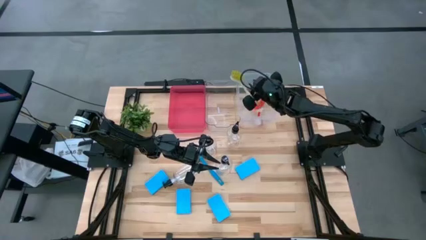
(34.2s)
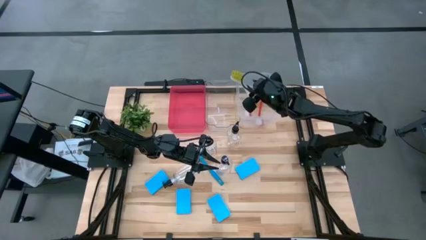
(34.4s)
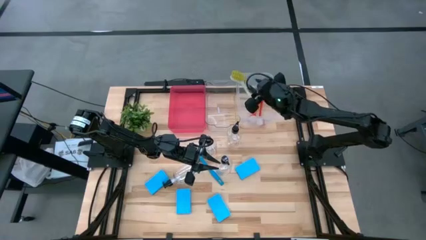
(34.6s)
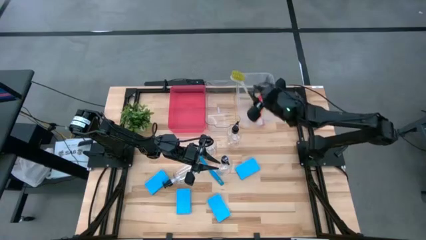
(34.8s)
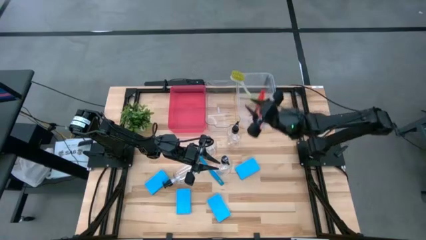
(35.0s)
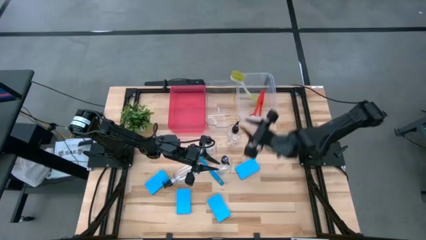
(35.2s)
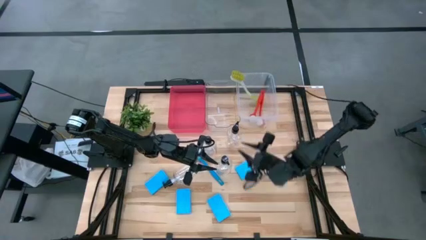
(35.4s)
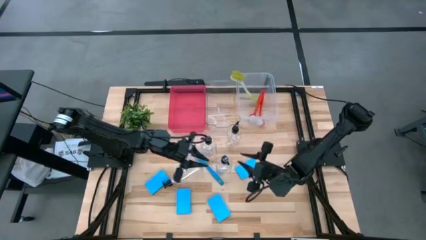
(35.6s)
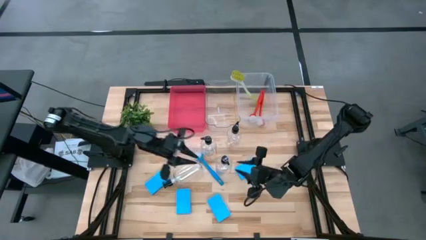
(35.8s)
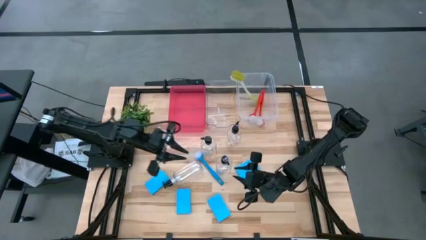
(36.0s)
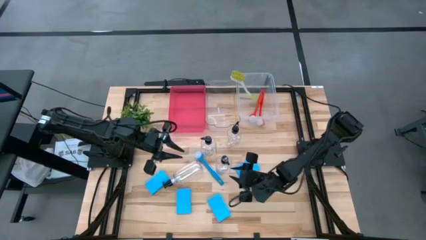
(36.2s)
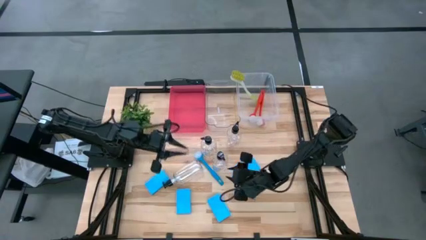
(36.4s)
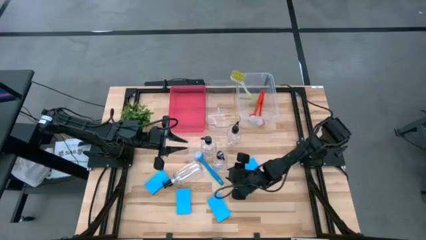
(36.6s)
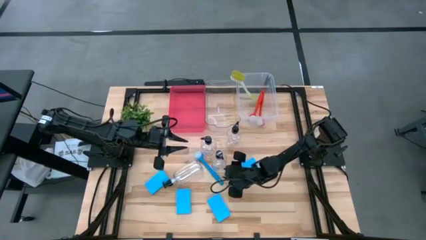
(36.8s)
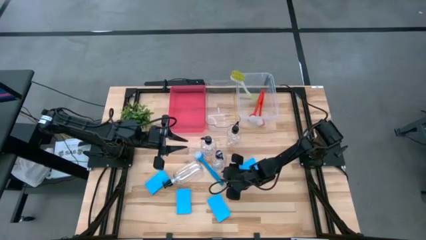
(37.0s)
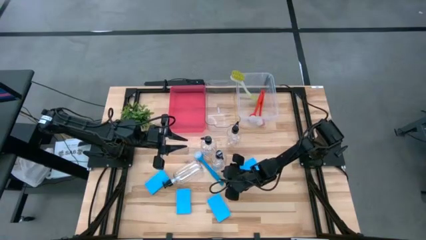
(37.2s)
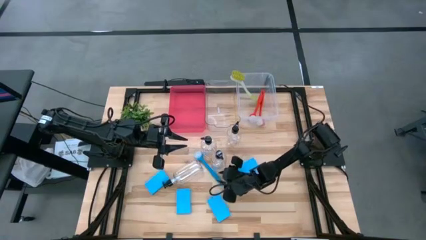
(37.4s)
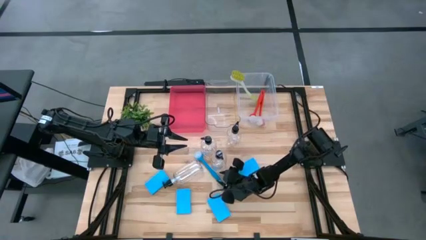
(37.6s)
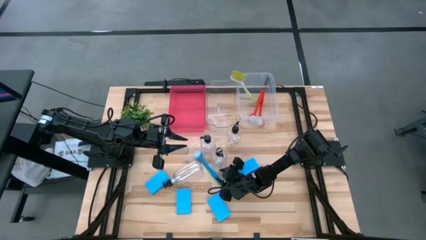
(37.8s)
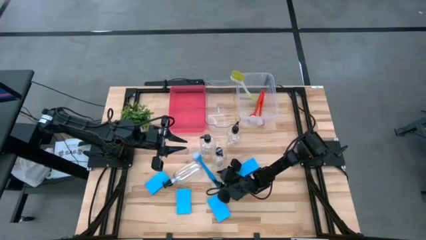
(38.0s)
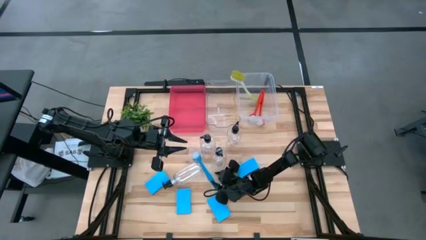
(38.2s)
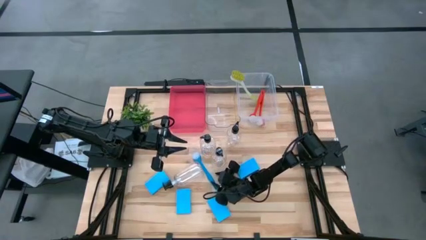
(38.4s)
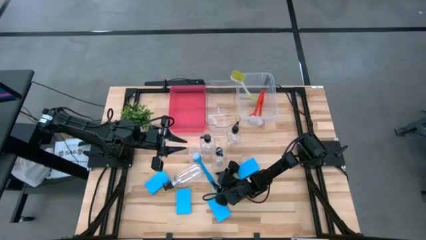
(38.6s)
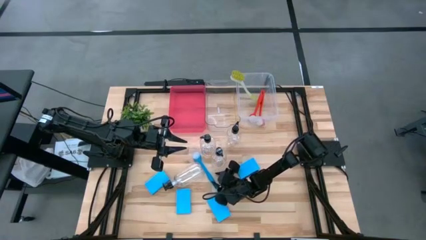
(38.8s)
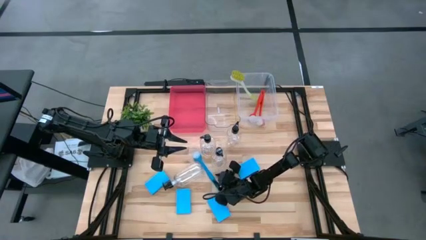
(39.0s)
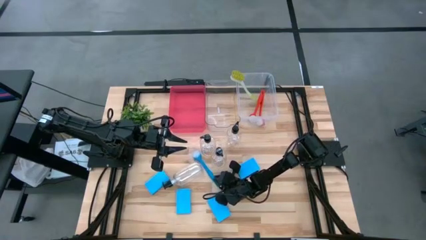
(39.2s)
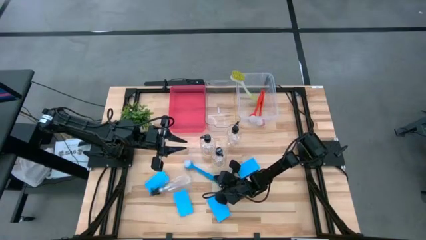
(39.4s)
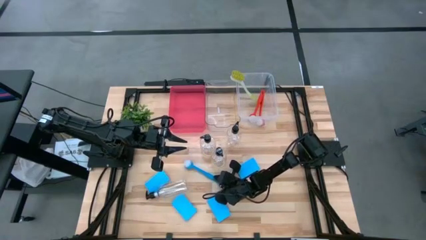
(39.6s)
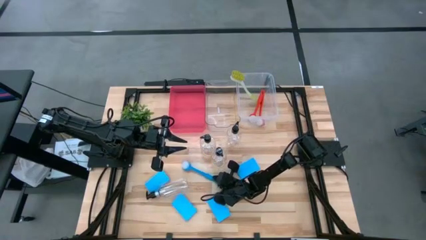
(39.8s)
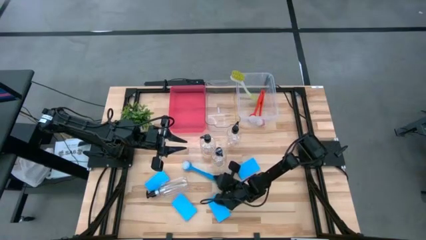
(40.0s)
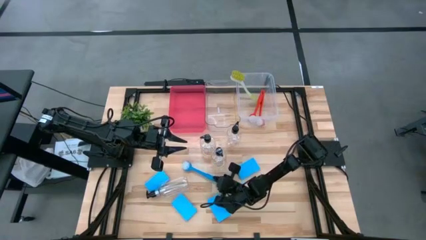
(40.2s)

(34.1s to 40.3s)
Task: Pick & Place Kitchen Sink Supplies
Put the blue kitchen brush into the white bin

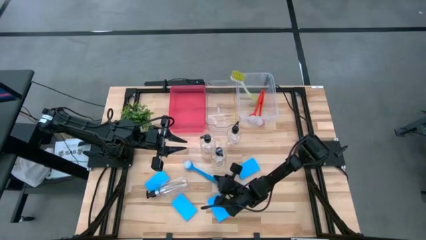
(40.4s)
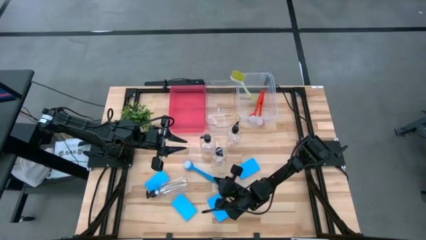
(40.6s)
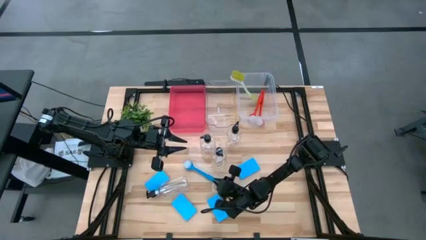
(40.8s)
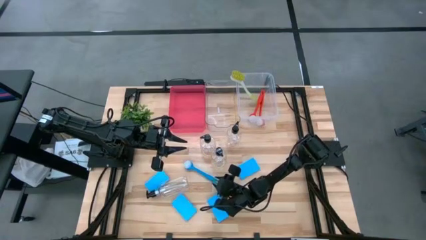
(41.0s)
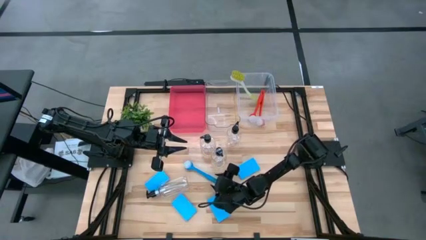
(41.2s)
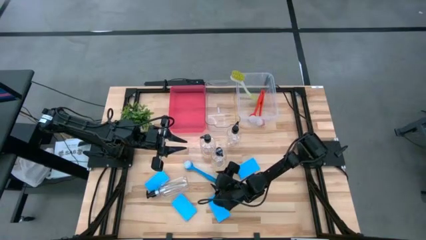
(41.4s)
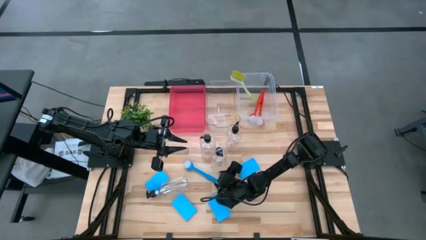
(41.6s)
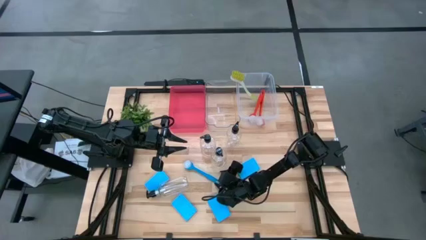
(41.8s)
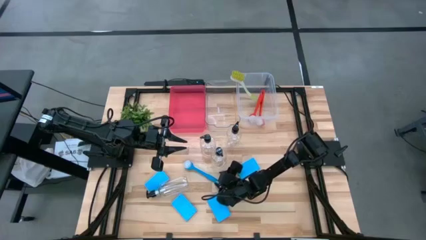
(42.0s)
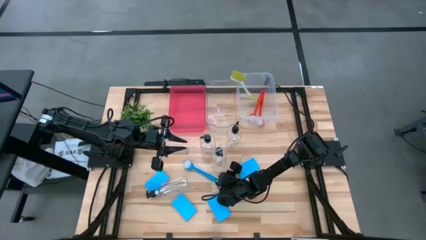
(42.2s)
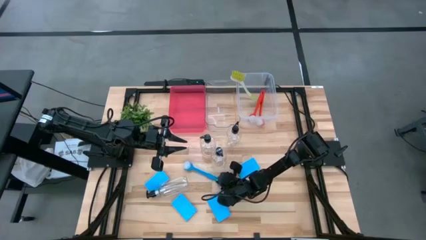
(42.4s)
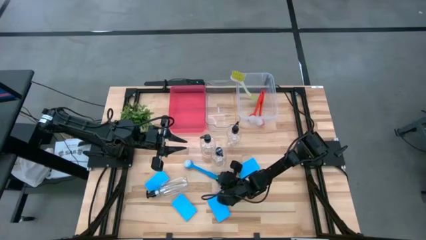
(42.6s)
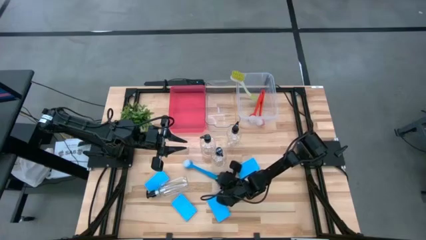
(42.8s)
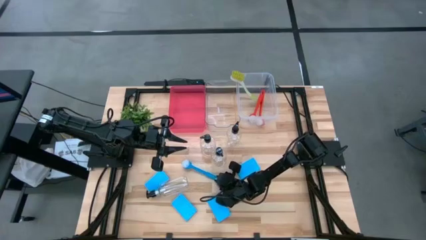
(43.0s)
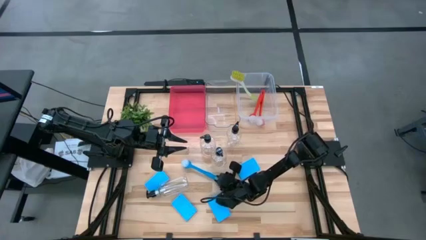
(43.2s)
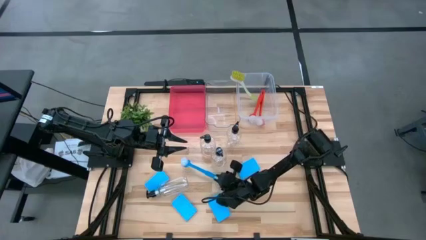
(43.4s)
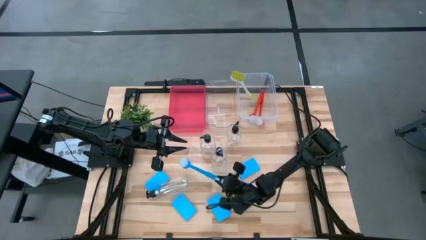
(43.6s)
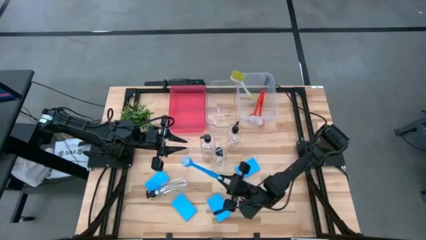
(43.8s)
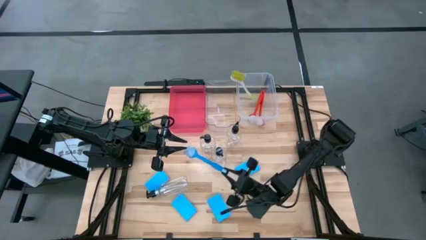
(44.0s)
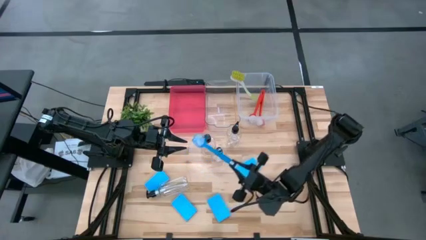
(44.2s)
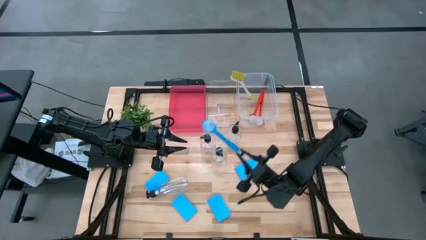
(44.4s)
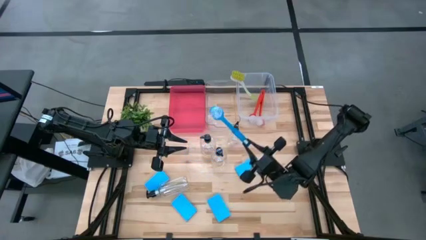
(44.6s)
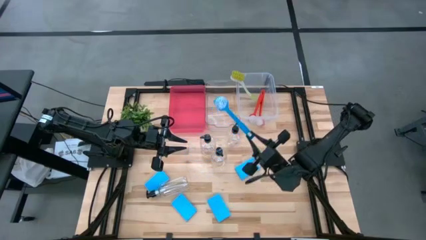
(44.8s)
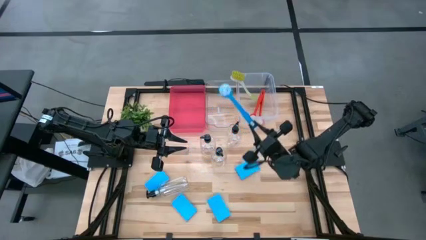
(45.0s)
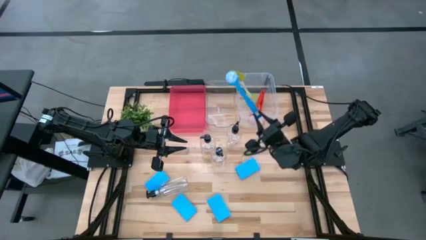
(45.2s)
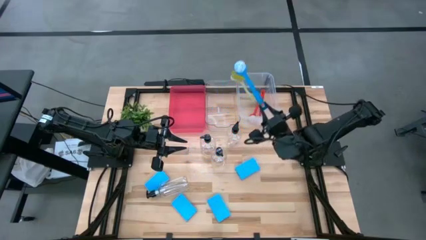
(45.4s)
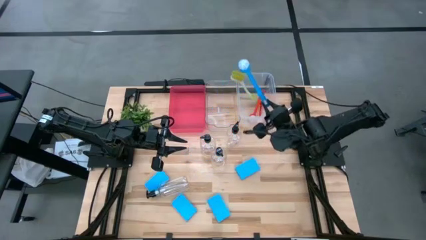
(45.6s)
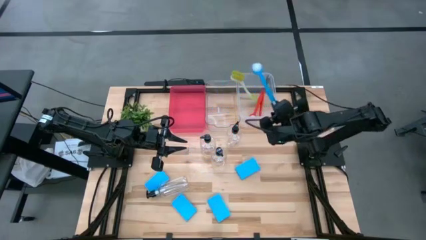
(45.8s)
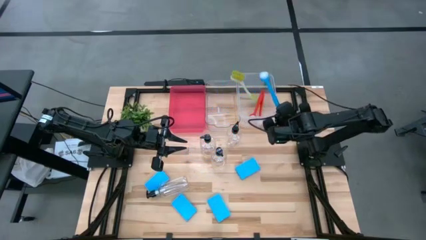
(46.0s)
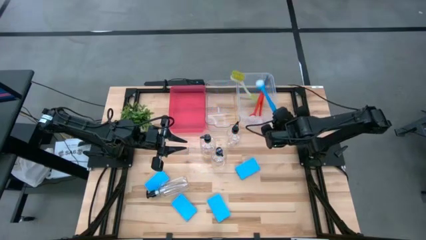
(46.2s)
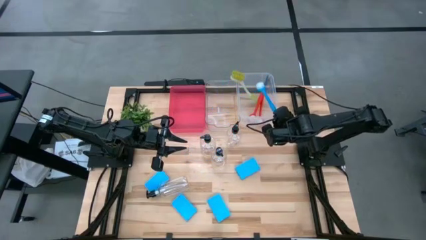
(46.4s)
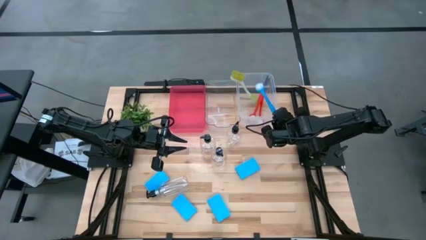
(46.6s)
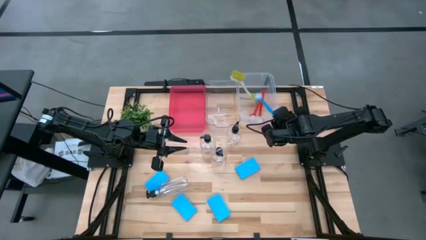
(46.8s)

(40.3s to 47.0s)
Put the blue kitchen brush into the white bin

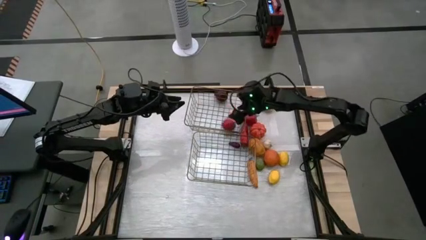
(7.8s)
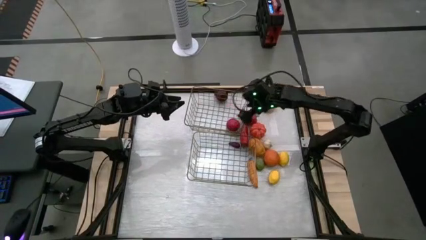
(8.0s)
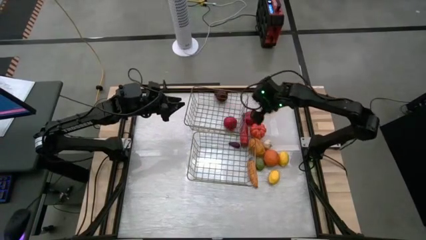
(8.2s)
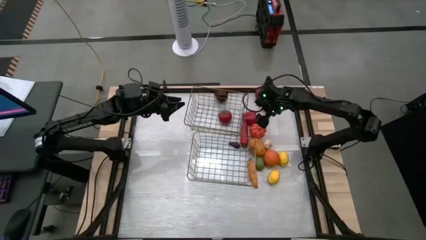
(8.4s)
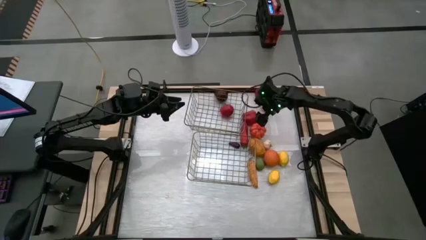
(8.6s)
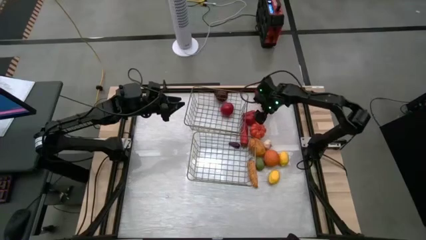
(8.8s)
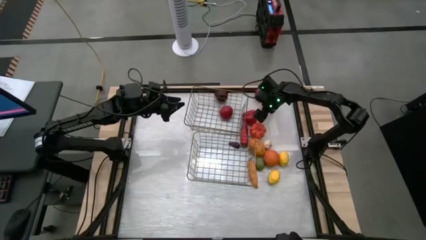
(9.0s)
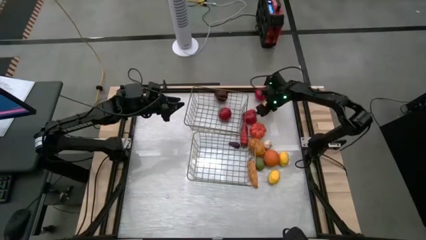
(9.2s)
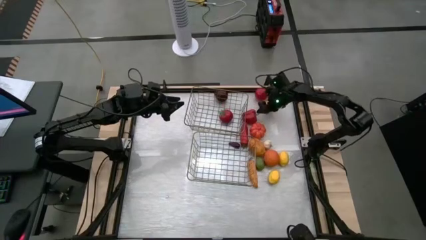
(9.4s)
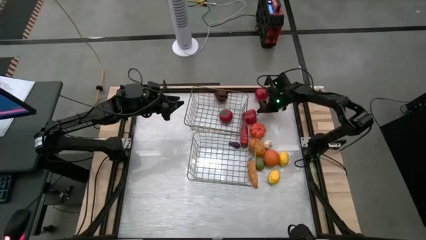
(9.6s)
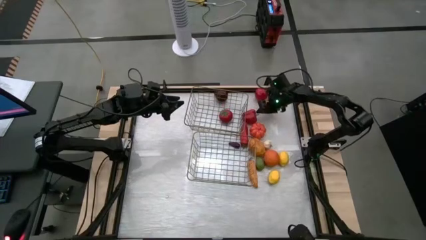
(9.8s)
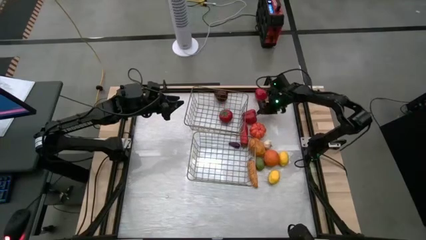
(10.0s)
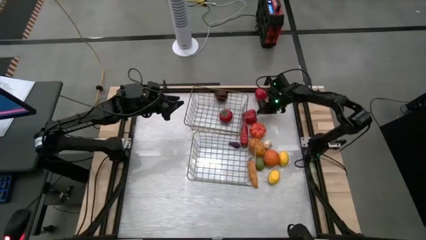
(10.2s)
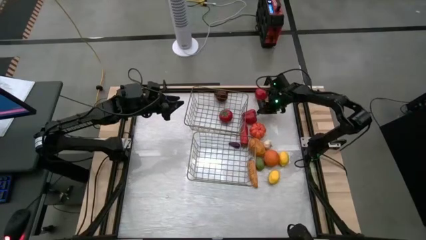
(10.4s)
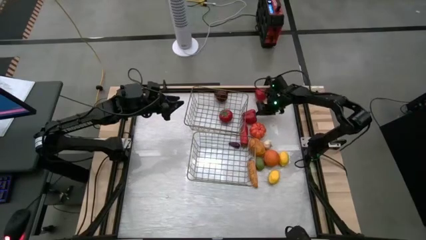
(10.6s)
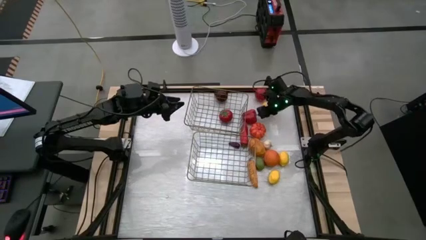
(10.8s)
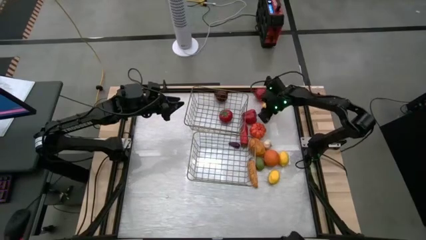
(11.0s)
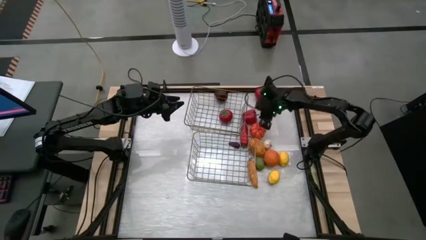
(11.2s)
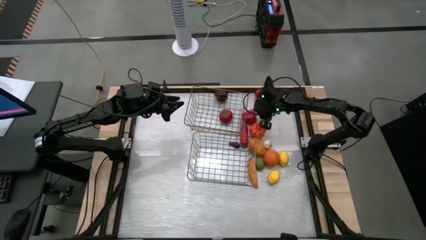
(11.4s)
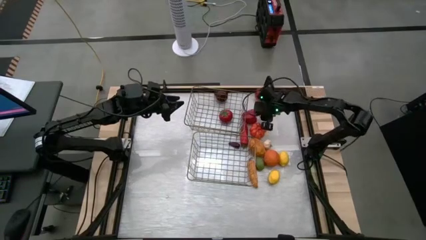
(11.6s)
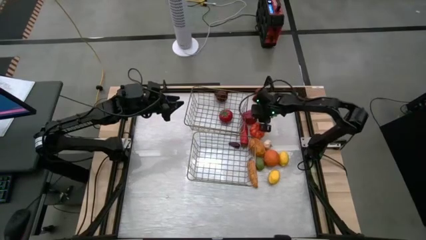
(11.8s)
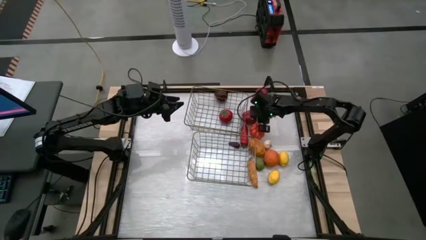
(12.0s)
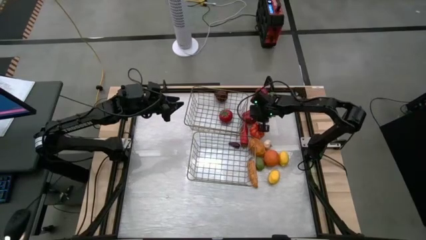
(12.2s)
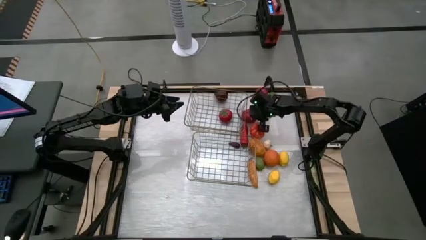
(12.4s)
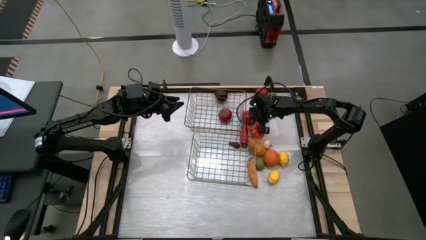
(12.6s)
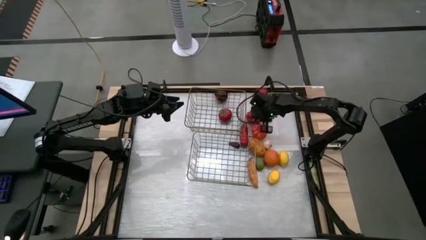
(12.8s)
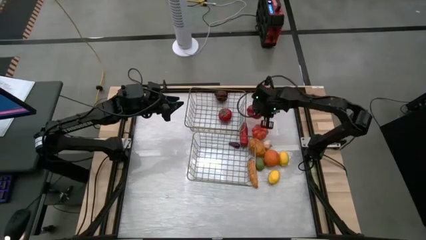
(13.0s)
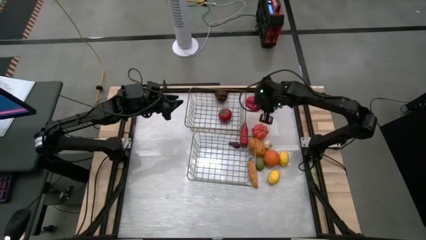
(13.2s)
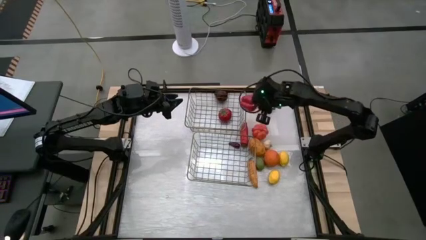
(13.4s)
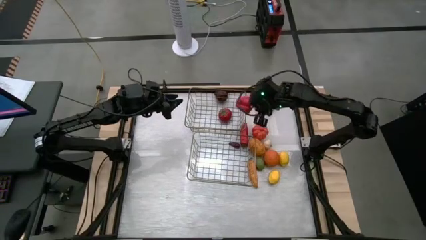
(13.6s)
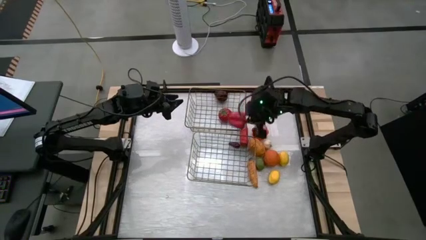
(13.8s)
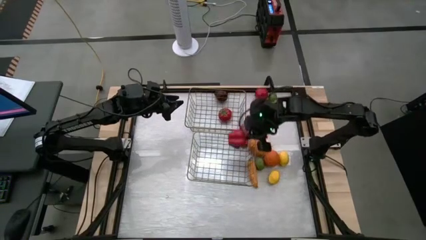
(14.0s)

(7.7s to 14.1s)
Task: Sort produce into baskets
Put the red bell pepper vegetable into the bottom wire basket
